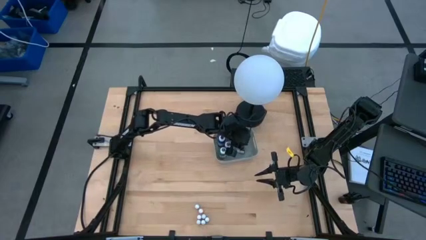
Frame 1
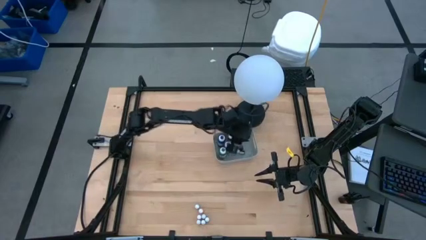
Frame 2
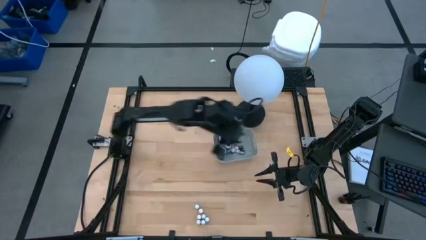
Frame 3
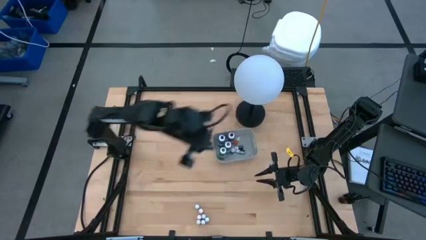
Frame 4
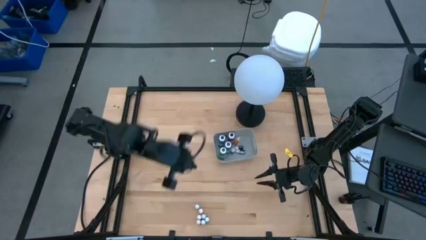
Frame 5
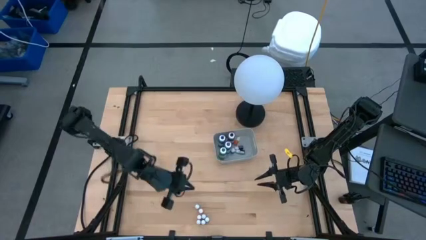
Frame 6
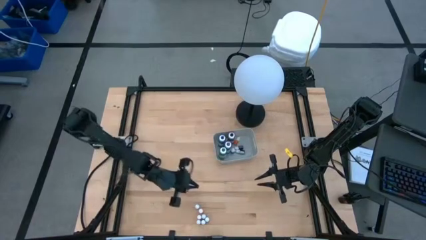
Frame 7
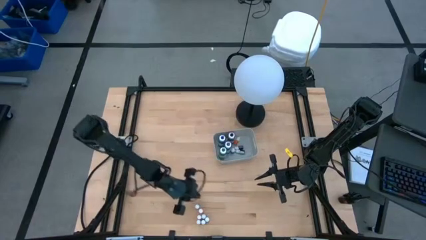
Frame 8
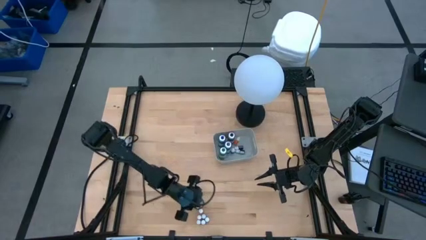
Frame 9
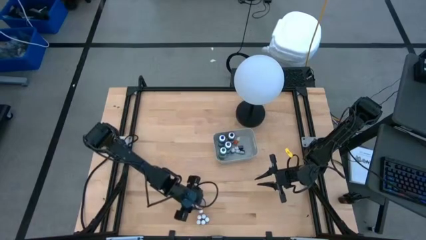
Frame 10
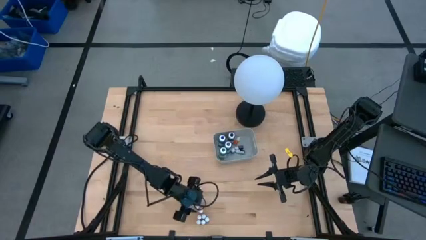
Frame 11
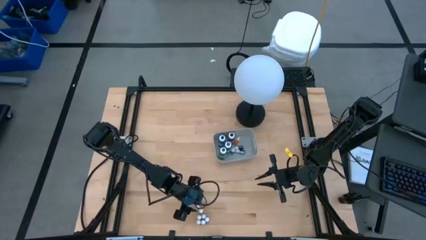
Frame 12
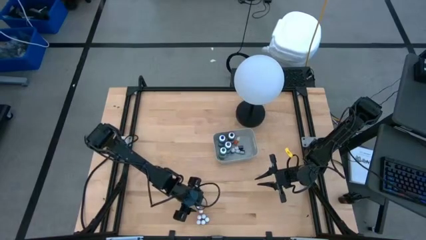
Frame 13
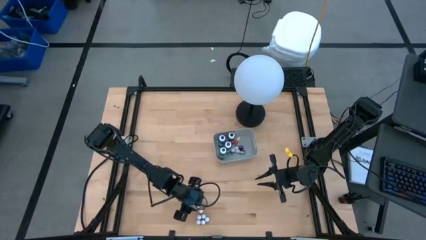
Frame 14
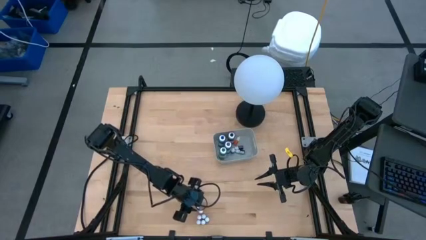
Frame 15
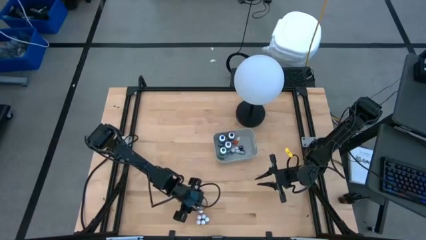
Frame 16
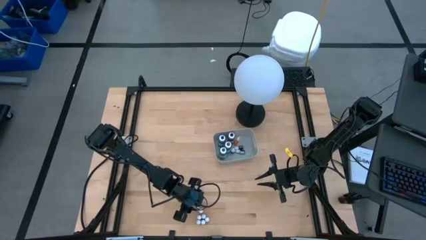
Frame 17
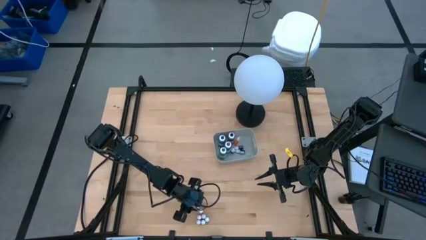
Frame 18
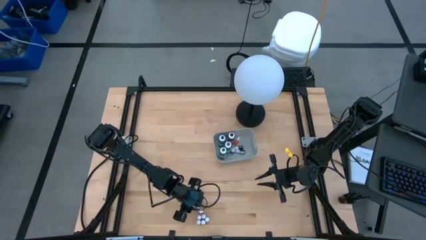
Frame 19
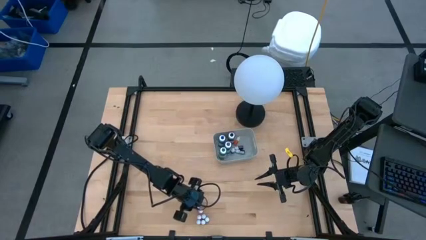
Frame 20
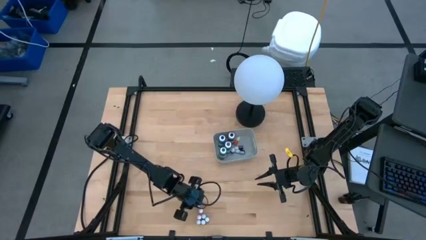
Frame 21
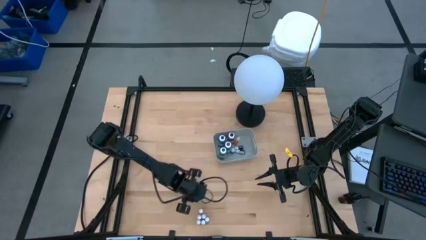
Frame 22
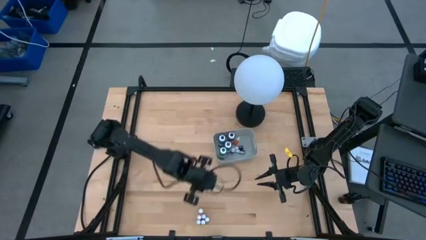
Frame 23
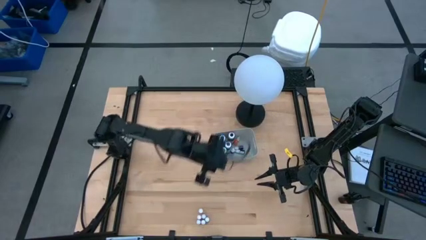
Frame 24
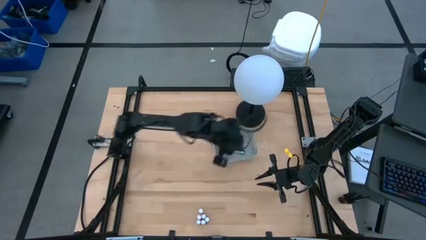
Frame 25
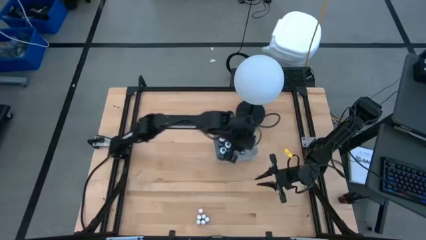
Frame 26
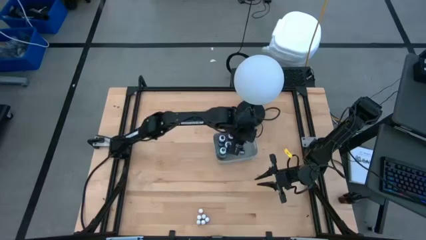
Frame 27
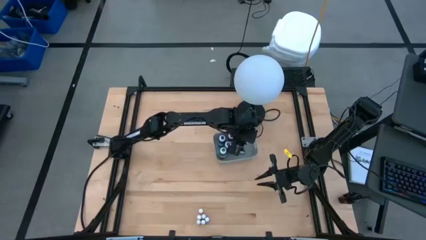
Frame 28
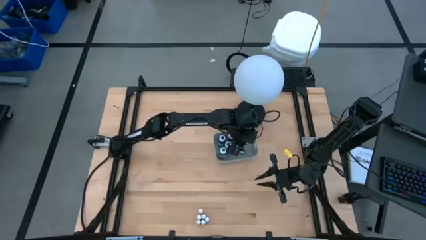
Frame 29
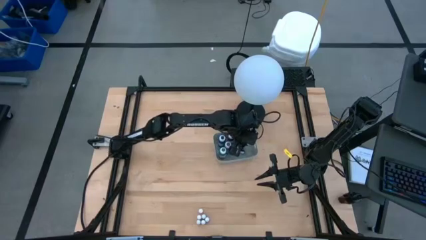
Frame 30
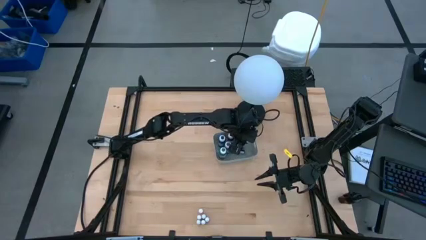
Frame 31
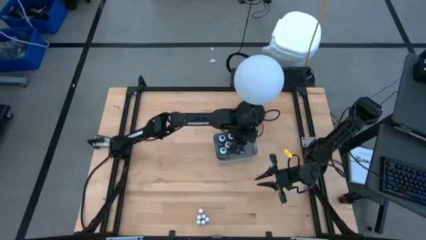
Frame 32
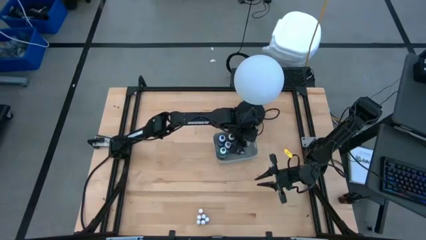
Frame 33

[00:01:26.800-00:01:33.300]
Task: Pick & Place food coloring
Put the purple food coloring bottle into the gray bin

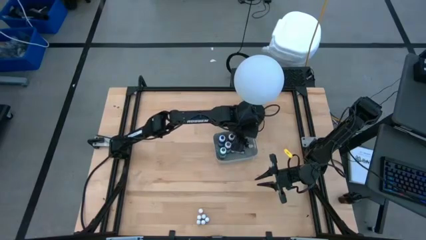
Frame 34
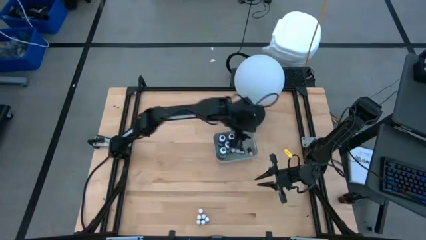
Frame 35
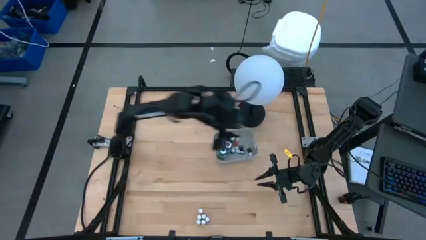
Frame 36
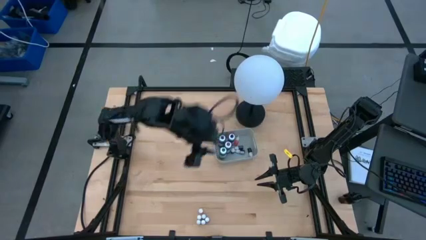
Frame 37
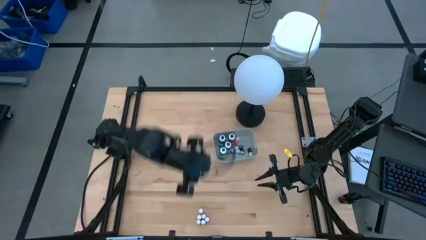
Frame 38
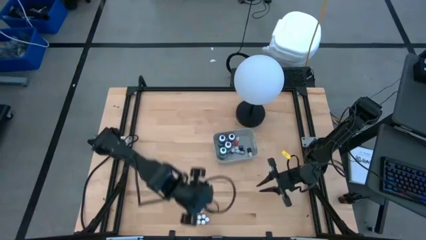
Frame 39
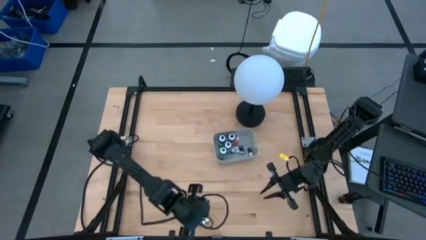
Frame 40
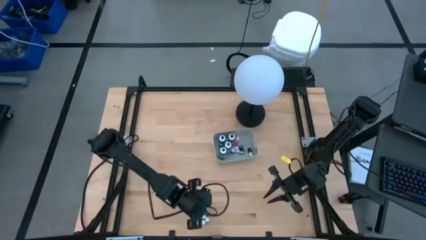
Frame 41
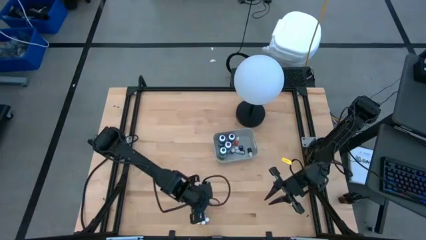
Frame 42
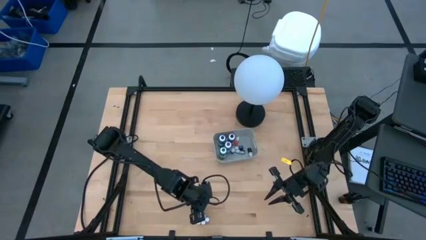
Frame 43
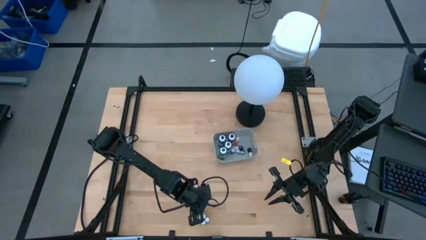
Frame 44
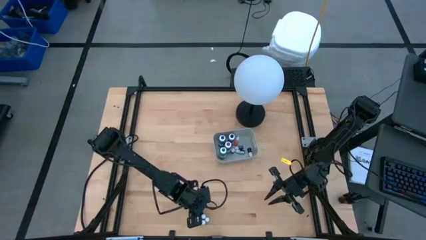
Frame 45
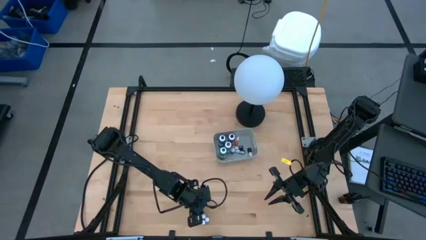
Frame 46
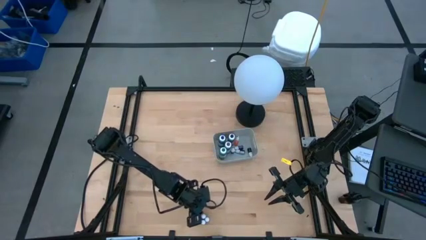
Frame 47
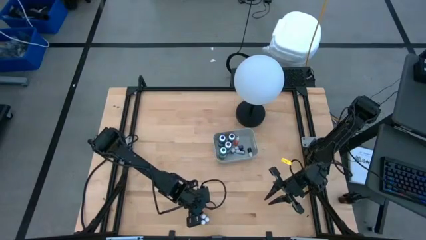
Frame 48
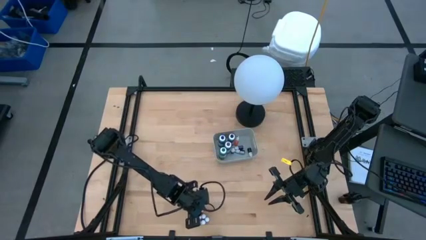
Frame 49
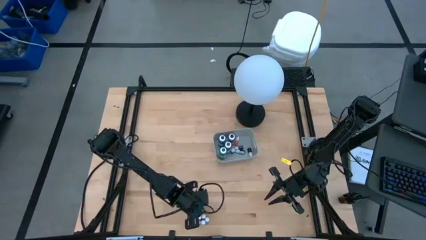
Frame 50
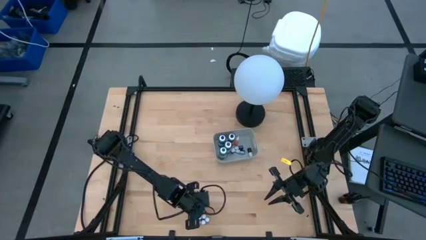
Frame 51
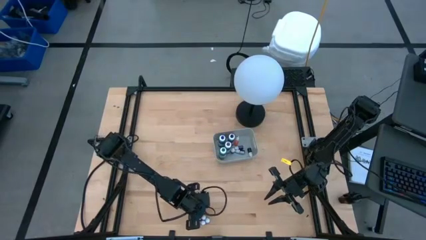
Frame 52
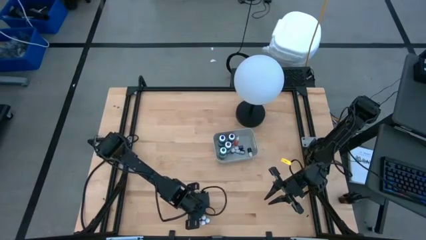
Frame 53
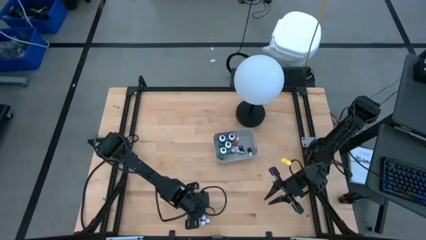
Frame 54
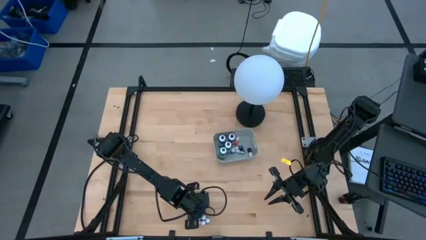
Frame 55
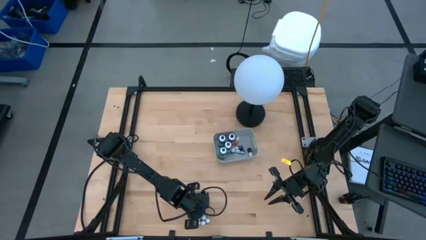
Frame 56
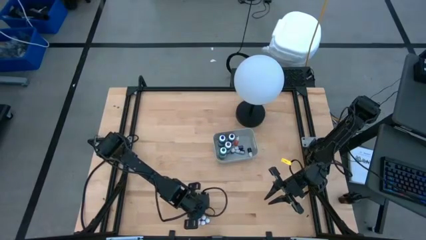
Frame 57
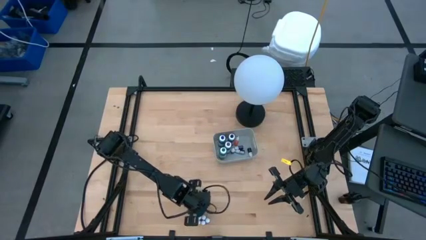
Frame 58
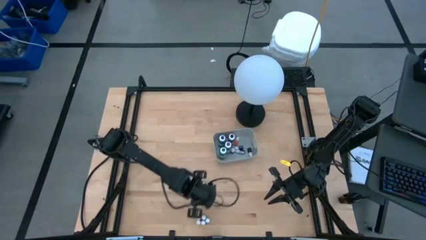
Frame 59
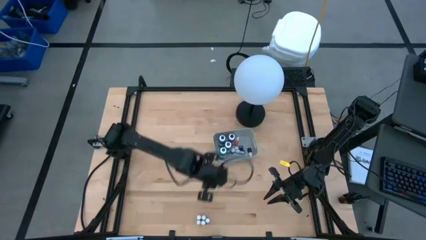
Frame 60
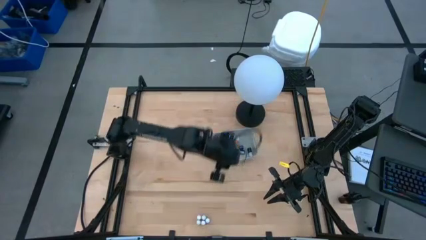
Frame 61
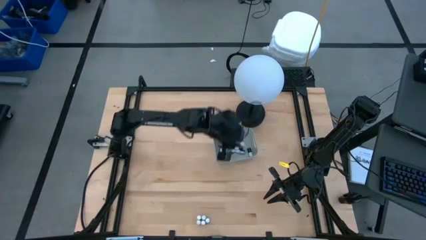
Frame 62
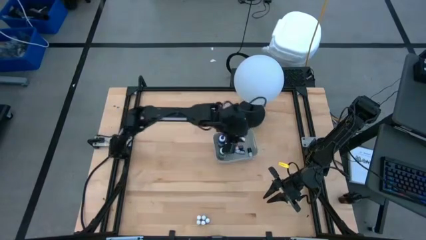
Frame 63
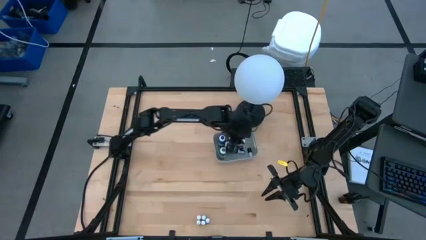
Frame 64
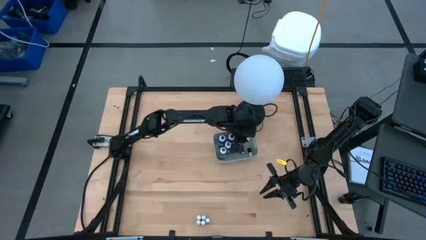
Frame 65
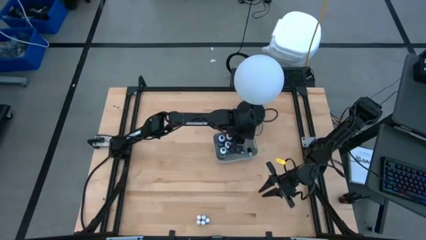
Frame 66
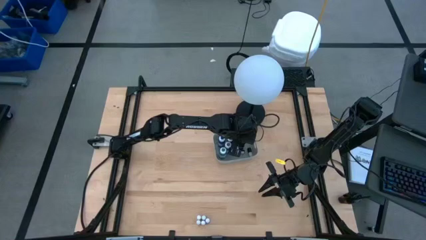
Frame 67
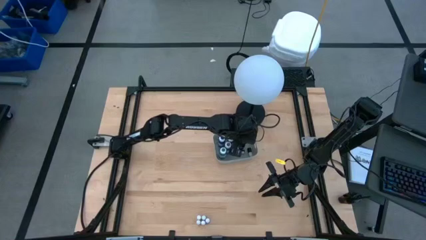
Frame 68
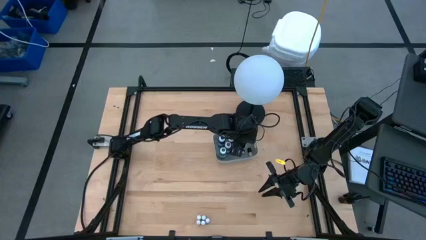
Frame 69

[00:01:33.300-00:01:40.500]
Put the orange food coloring bottle into the gray bin
